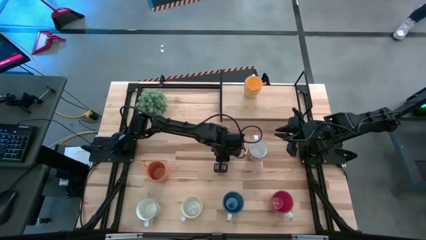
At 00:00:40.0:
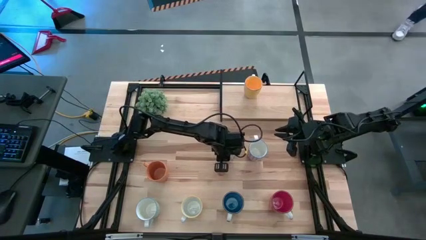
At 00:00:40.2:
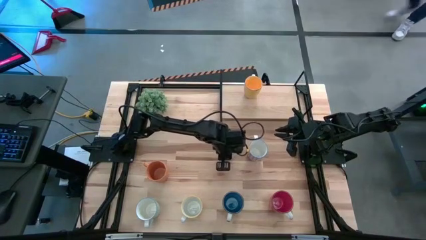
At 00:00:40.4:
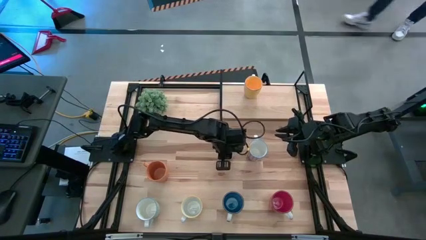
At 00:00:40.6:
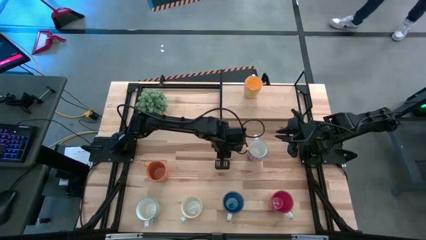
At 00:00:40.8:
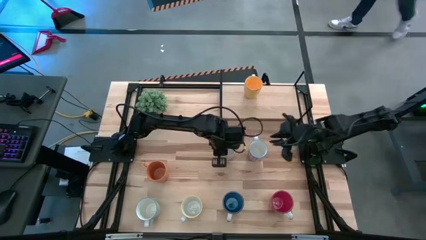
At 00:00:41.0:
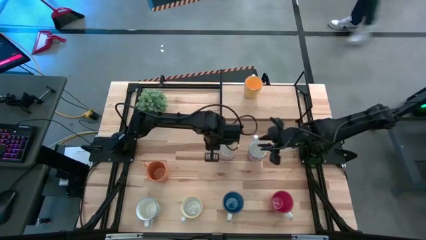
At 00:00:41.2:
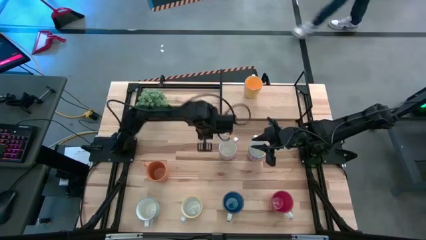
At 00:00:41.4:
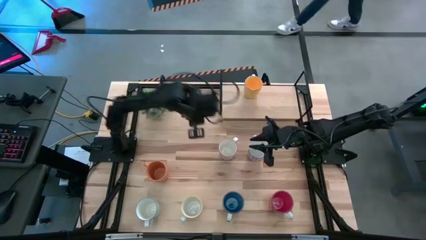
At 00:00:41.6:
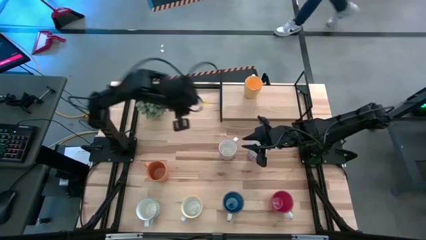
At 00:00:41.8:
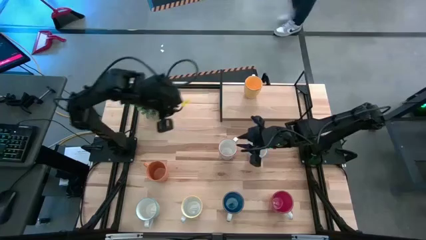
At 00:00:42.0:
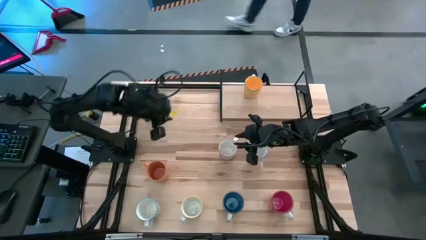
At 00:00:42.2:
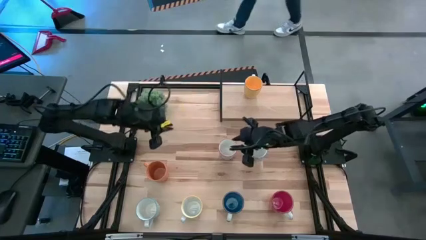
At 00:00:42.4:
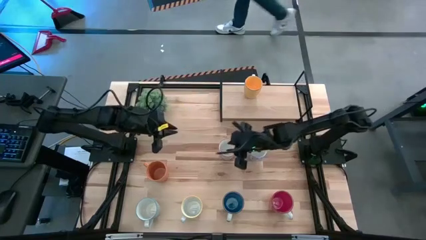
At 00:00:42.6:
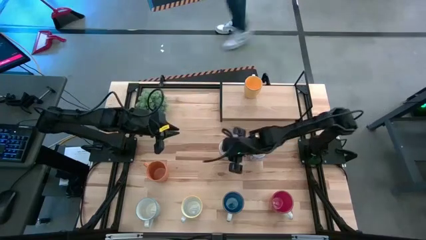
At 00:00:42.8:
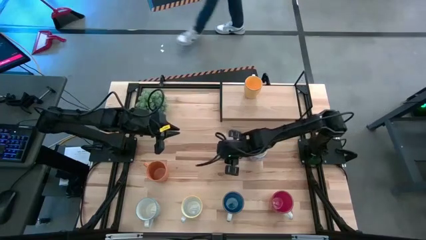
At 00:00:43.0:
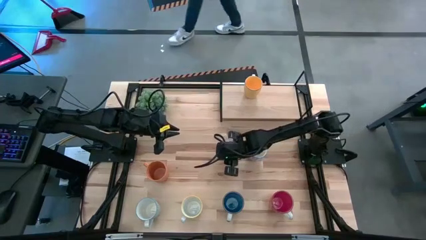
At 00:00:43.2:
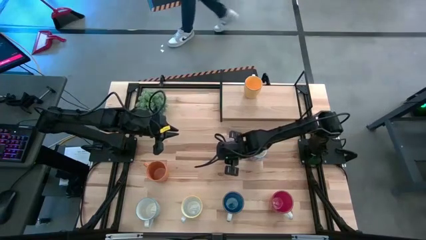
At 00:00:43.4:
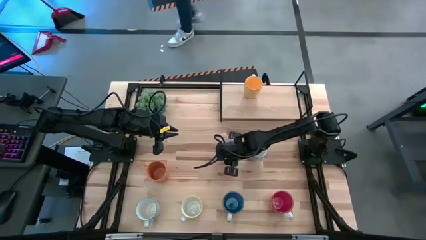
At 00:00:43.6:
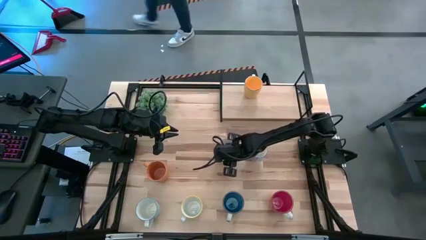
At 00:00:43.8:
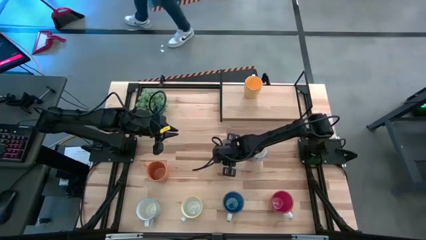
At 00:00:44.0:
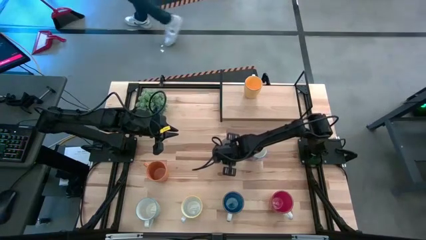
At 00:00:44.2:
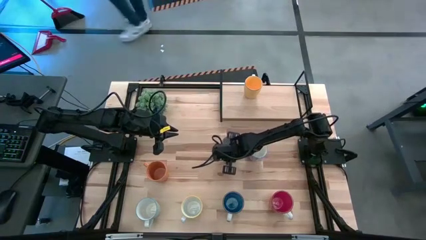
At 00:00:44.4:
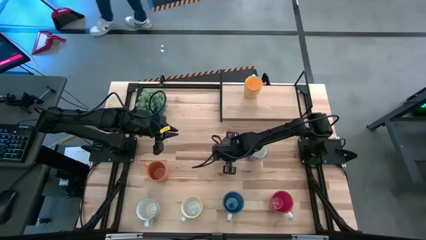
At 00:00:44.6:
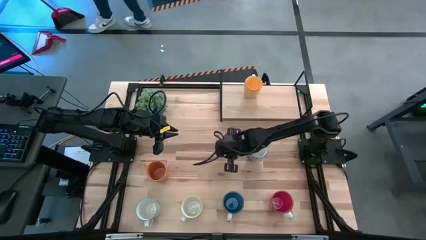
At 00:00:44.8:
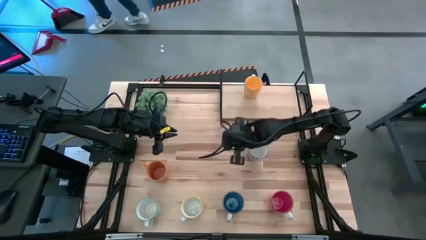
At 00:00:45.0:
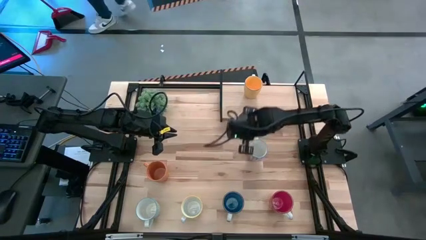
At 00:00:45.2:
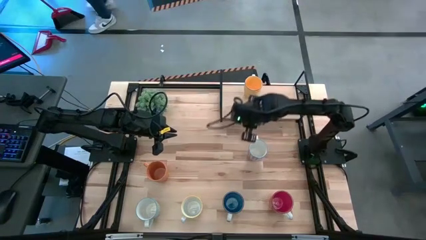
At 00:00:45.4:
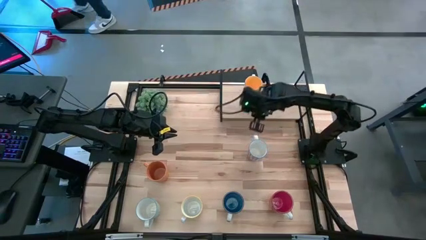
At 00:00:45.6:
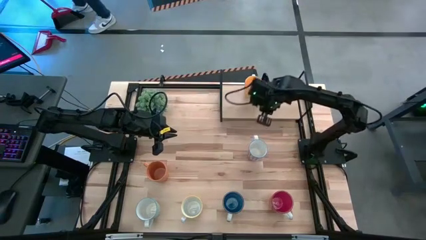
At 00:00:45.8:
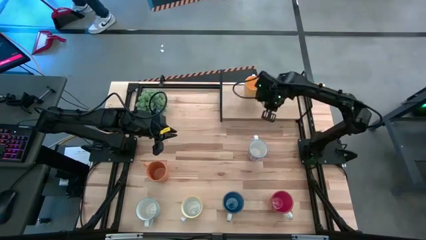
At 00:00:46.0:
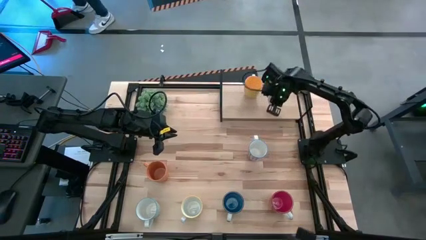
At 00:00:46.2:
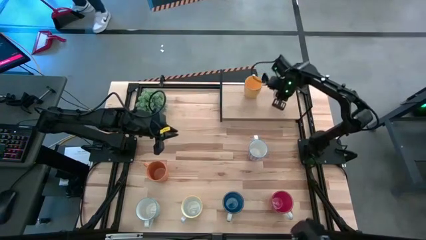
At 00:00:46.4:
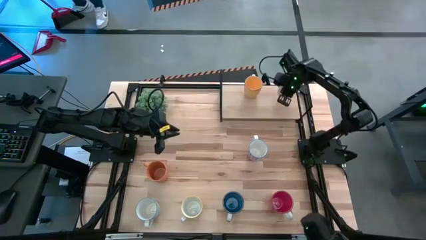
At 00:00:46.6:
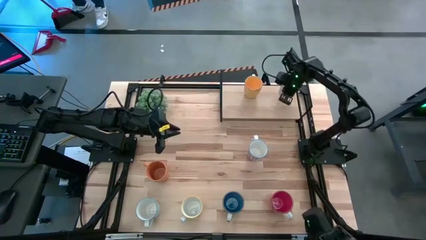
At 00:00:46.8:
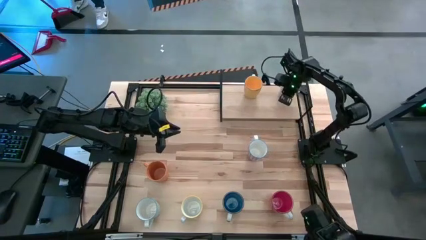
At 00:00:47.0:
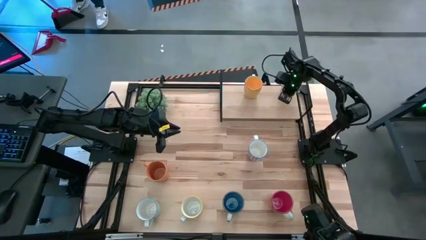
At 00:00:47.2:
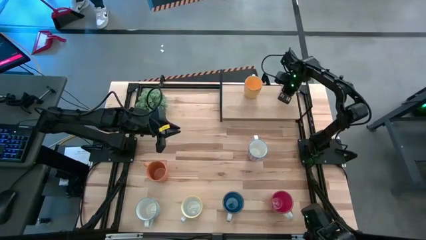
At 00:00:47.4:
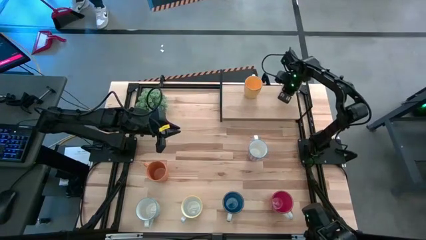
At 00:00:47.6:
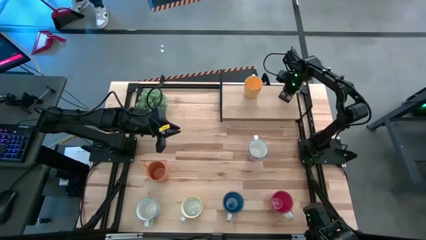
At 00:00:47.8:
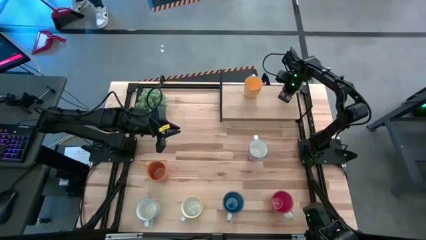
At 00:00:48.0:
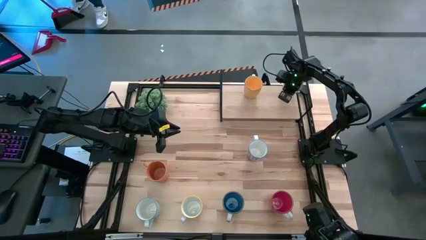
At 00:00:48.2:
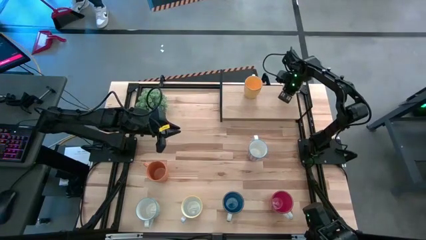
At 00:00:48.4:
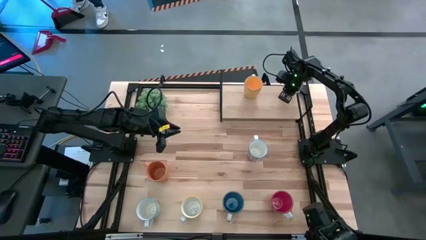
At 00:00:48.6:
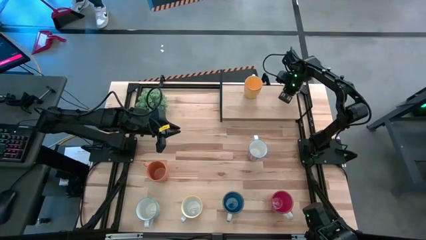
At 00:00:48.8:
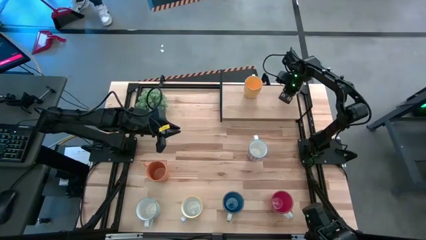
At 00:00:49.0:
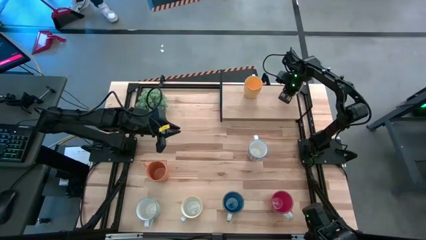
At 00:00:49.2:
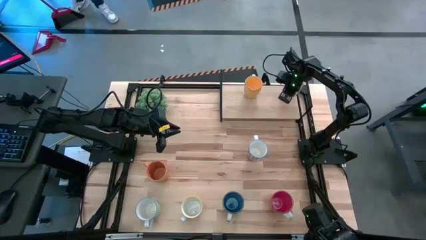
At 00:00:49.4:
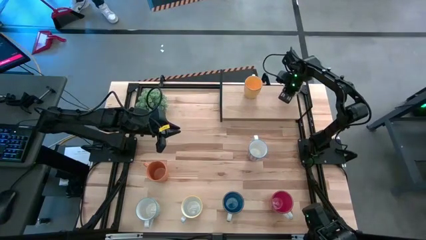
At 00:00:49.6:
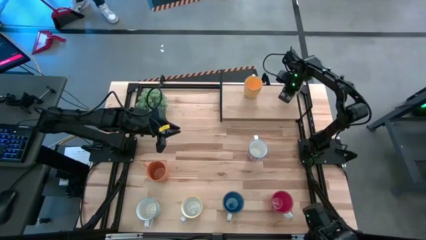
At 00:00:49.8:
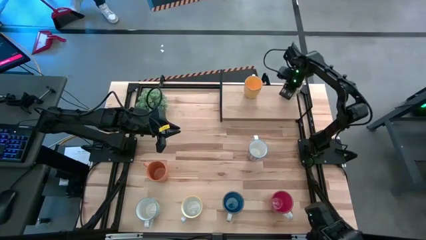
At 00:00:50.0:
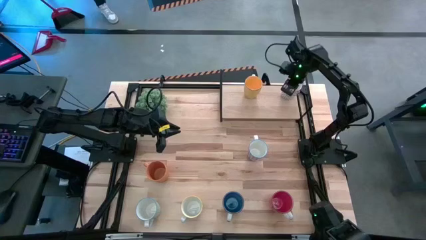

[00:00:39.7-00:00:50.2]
Task: Place coffee mugs
Put the gray patterned mug on the shelf

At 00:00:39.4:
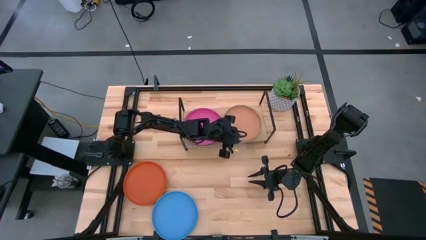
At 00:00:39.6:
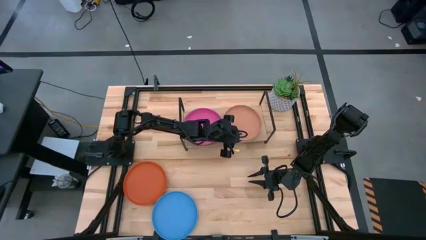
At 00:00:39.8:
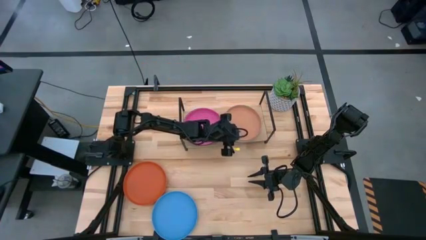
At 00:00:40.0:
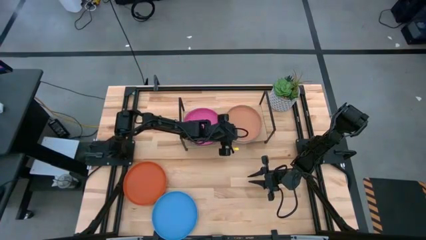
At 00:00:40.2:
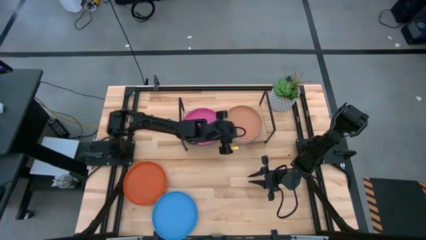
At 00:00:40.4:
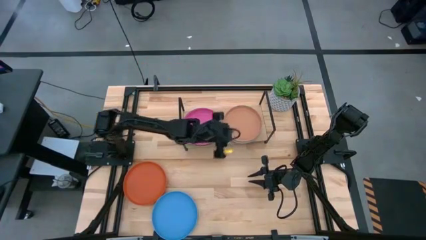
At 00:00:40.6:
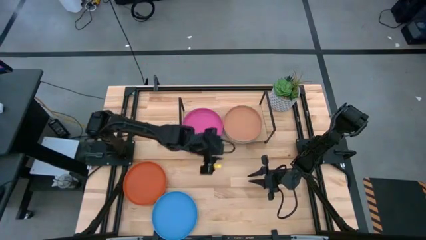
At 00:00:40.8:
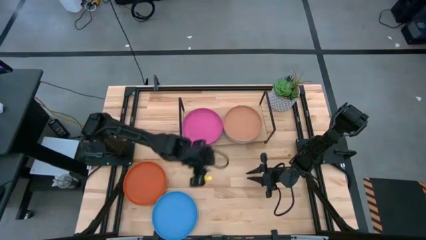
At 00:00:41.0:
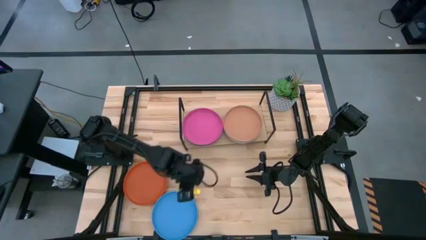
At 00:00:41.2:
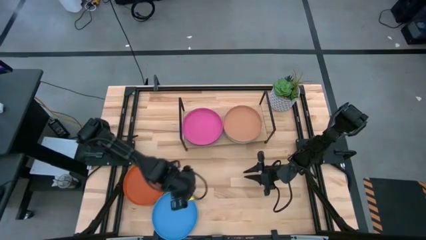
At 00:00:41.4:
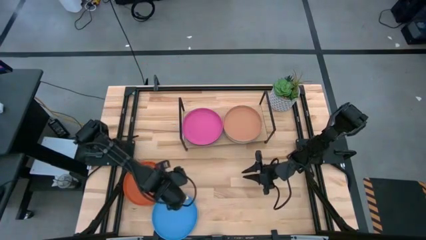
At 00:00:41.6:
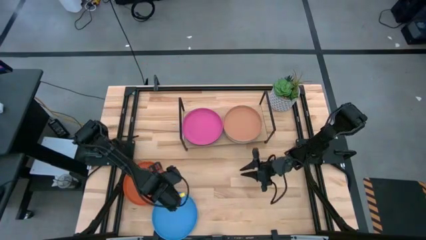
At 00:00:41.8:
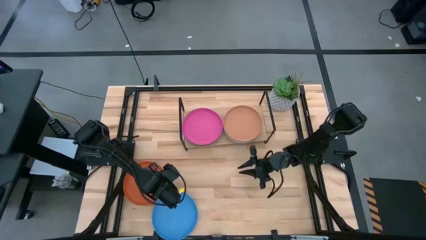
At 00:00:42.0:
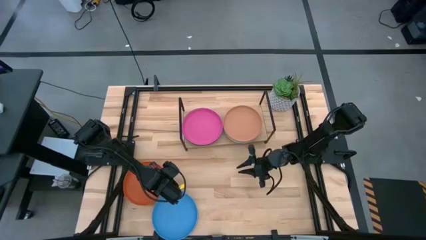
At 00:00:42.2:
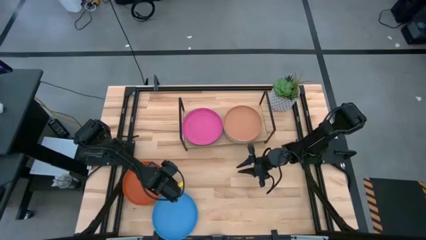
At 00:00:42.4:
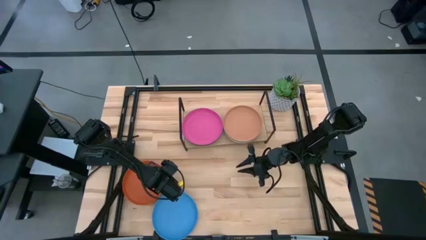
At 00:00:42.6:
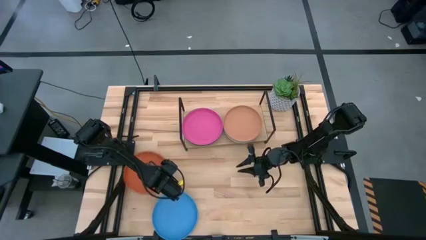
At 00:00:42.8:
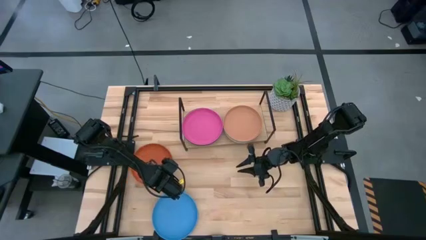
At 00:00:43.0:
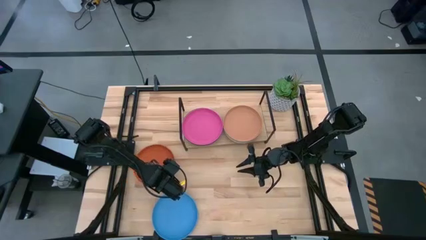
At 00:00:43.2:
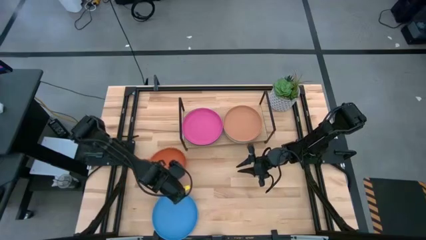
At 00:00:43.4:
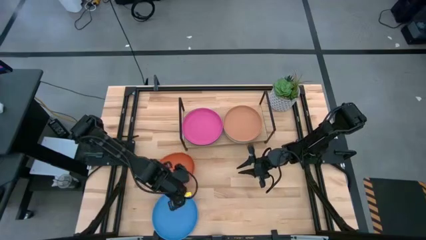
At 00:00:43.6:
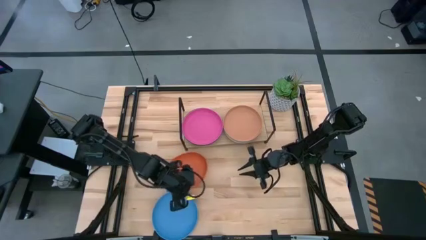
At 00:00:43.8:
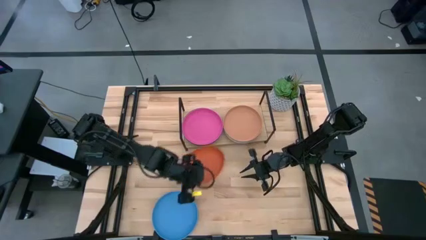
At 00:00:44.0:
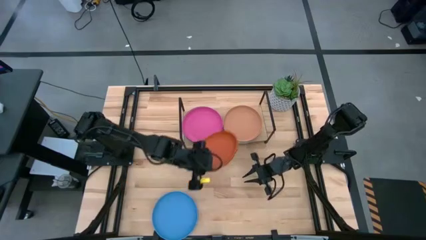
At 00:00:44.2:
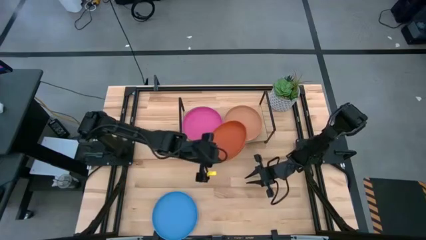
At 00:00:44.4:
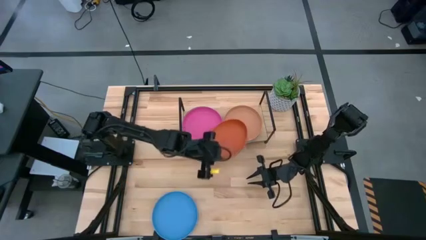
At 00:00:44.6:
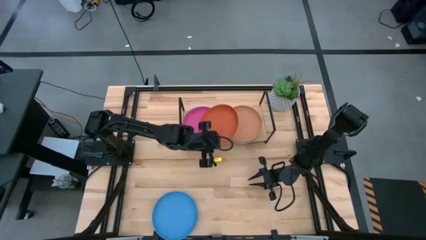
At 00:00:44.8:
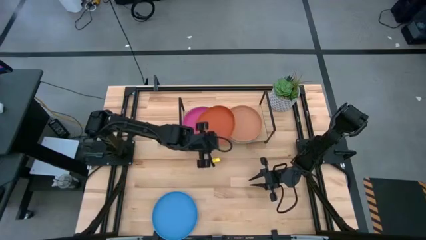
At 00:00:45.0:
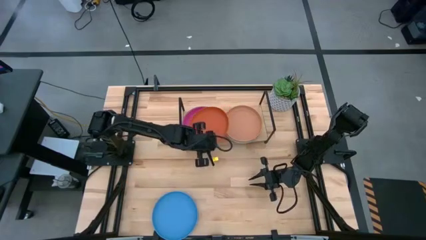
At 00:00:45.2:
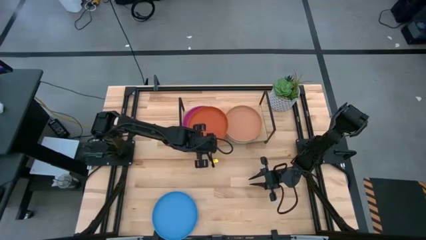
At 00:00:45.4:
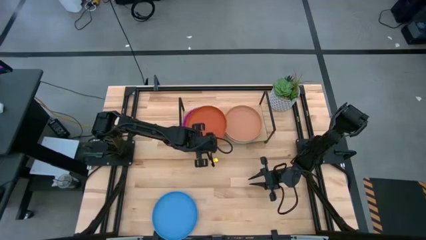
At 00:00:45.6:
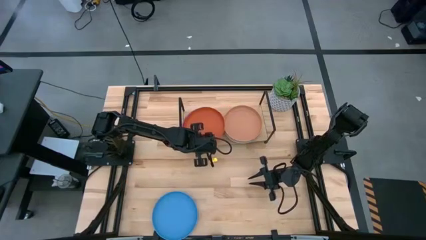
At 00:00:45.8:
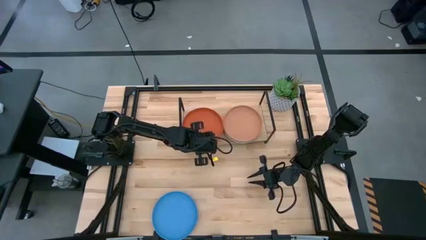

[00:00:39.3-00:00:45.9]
Task: Place and stack plates onto a shelf
Stack the orange plate on top of the pink plate on the shelf
